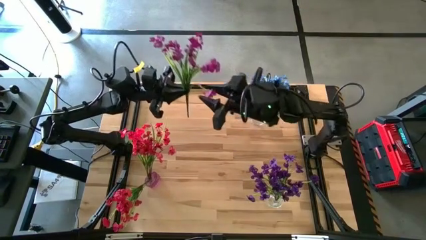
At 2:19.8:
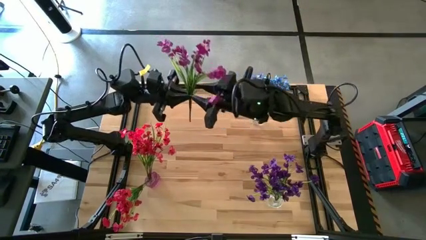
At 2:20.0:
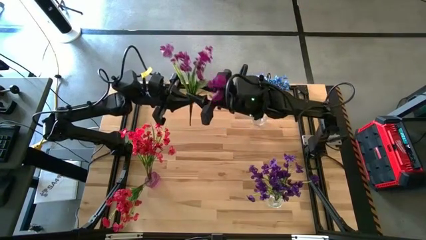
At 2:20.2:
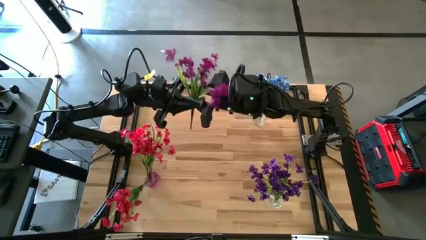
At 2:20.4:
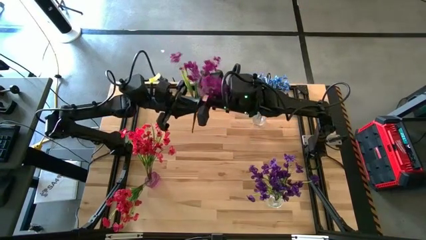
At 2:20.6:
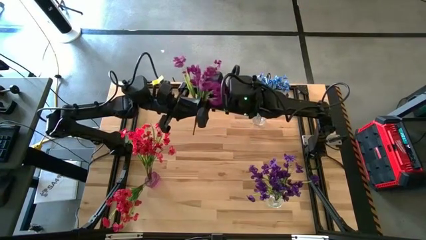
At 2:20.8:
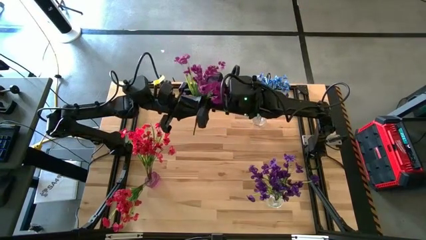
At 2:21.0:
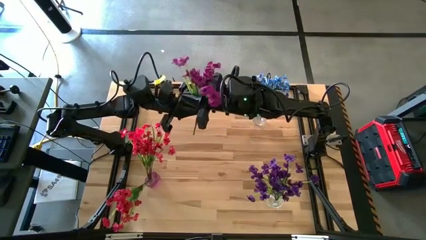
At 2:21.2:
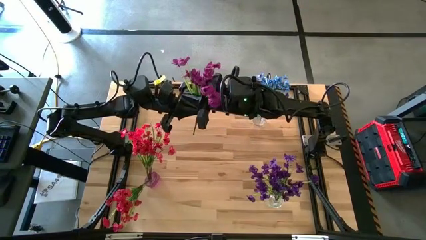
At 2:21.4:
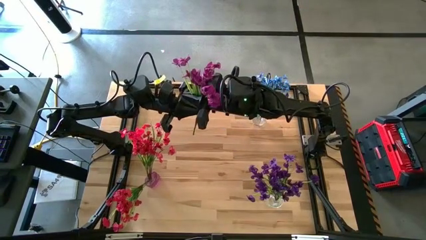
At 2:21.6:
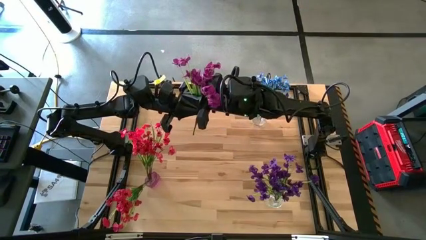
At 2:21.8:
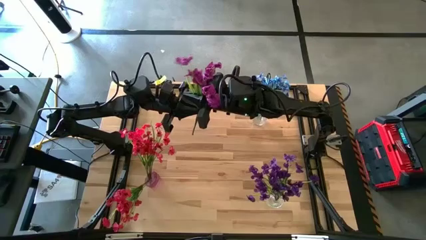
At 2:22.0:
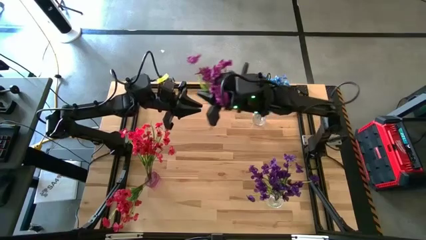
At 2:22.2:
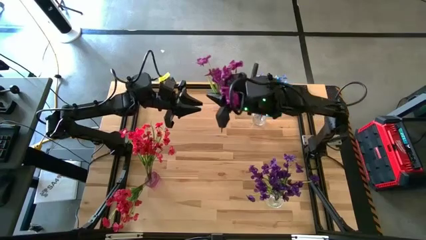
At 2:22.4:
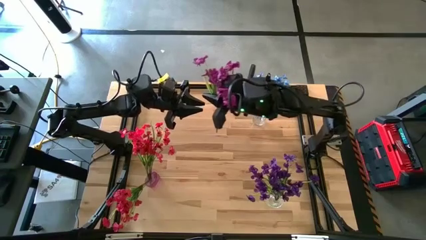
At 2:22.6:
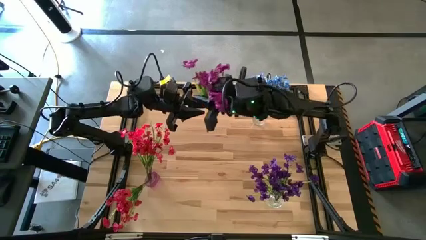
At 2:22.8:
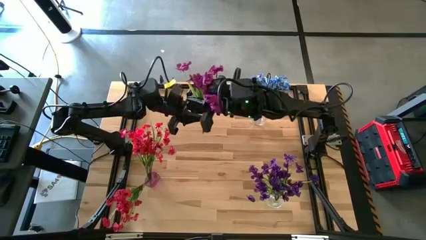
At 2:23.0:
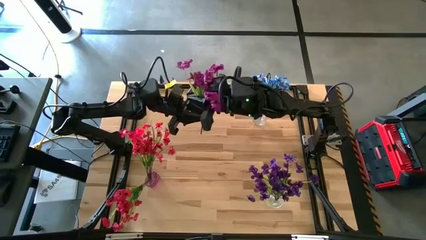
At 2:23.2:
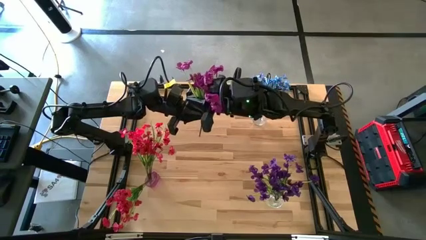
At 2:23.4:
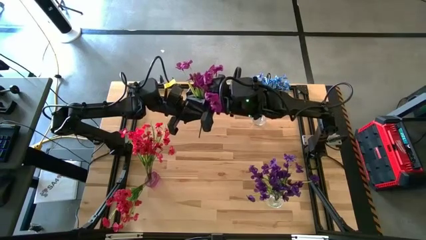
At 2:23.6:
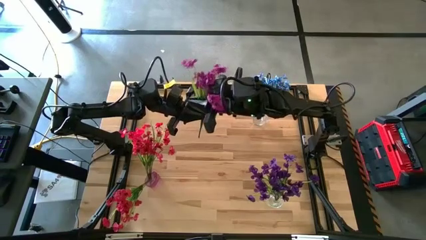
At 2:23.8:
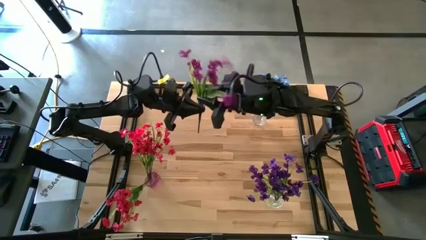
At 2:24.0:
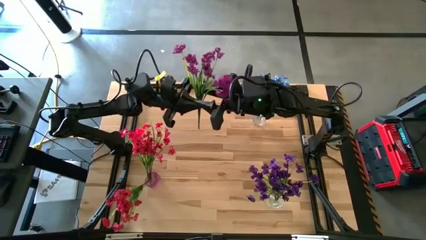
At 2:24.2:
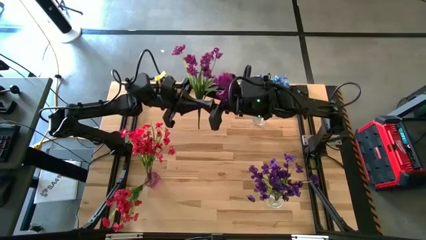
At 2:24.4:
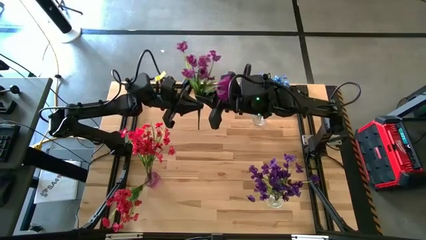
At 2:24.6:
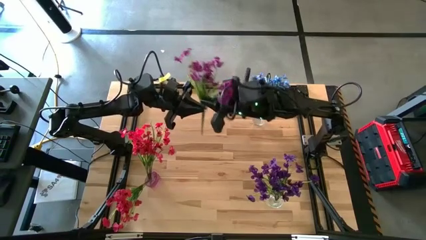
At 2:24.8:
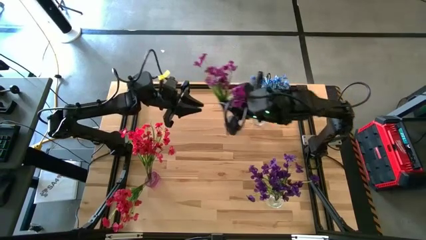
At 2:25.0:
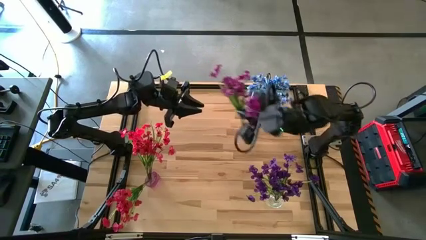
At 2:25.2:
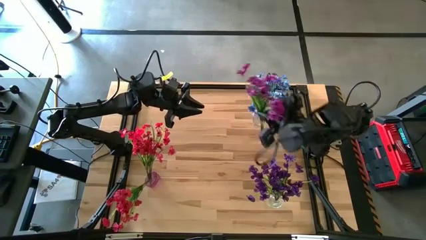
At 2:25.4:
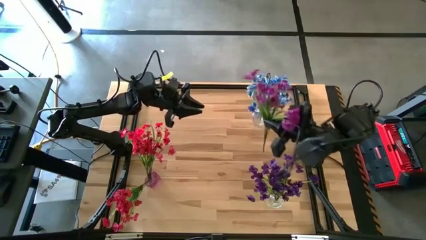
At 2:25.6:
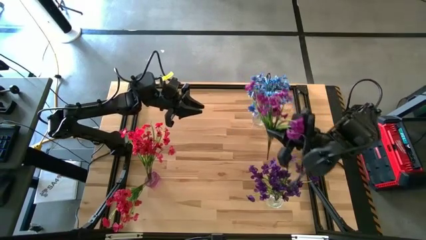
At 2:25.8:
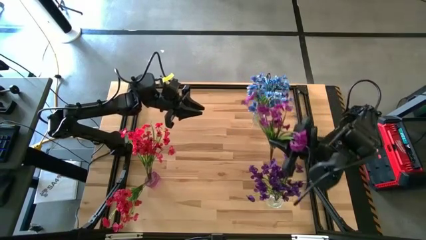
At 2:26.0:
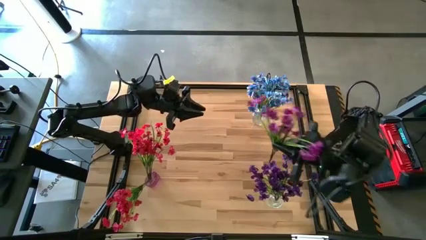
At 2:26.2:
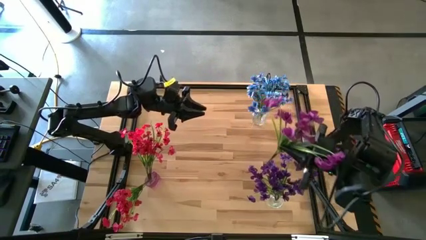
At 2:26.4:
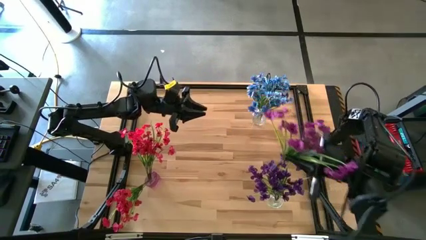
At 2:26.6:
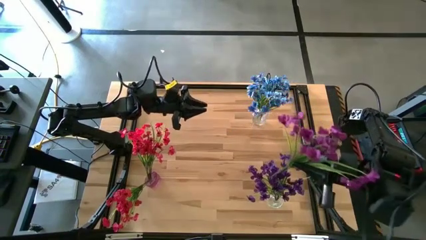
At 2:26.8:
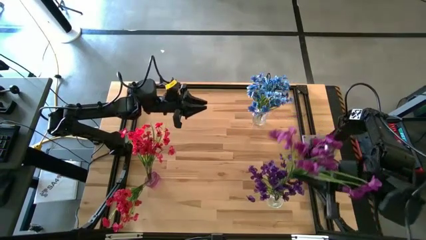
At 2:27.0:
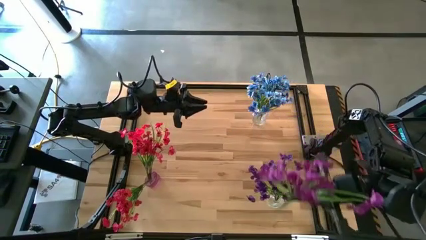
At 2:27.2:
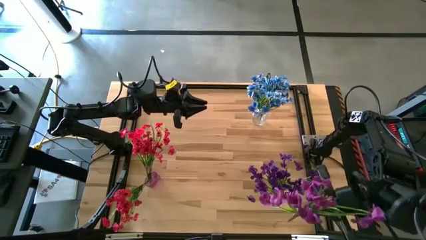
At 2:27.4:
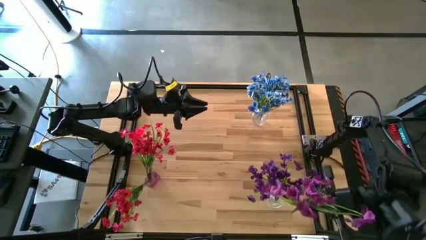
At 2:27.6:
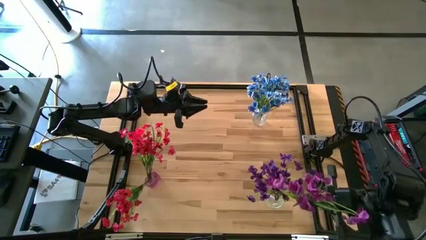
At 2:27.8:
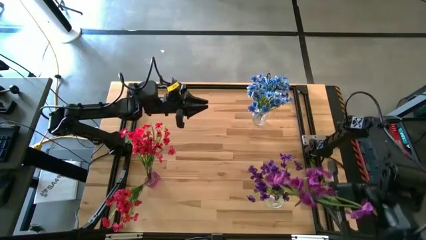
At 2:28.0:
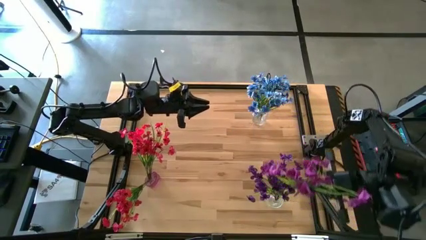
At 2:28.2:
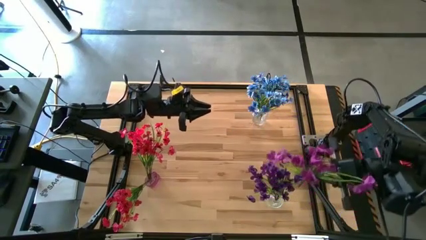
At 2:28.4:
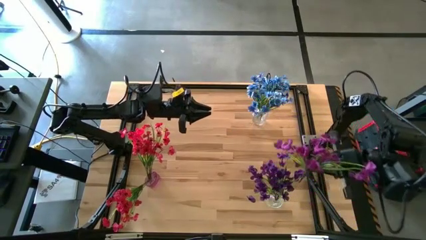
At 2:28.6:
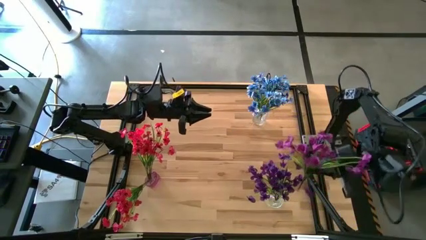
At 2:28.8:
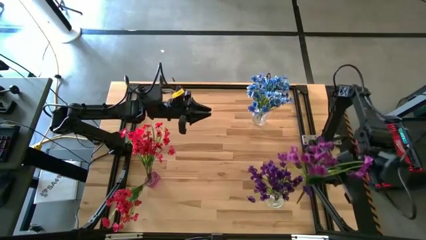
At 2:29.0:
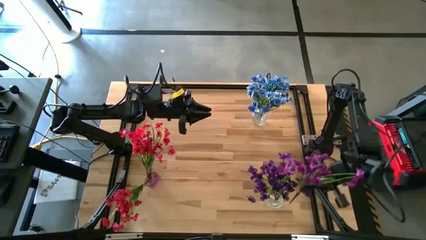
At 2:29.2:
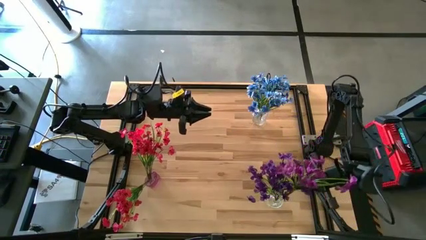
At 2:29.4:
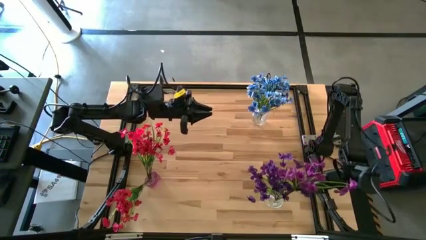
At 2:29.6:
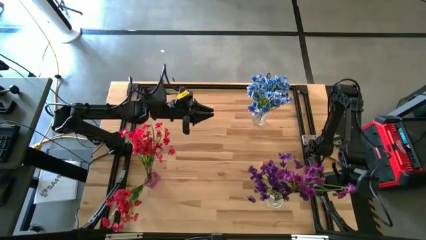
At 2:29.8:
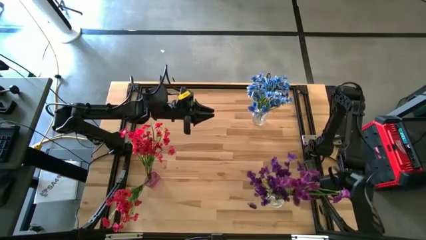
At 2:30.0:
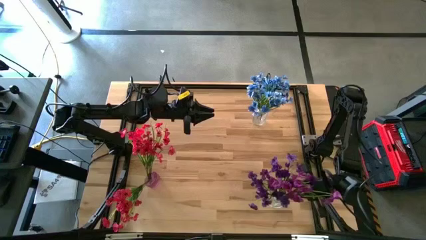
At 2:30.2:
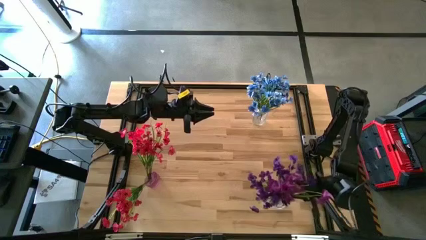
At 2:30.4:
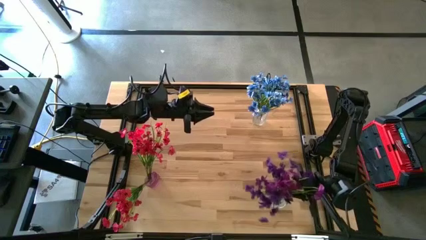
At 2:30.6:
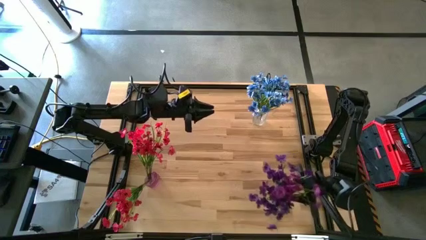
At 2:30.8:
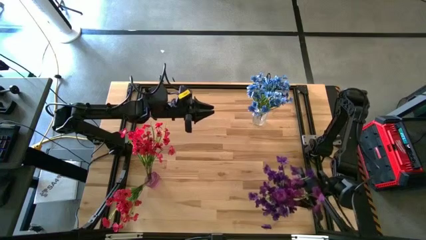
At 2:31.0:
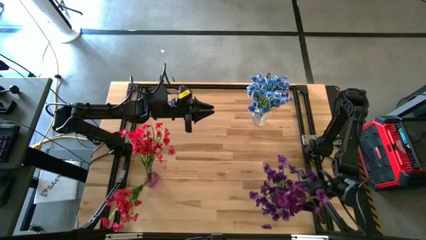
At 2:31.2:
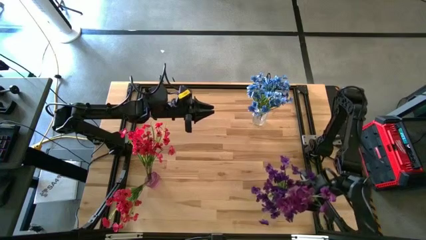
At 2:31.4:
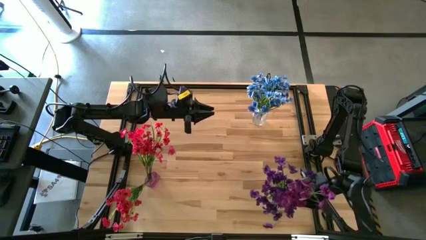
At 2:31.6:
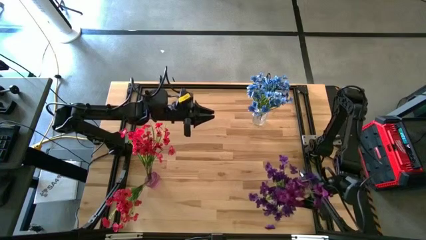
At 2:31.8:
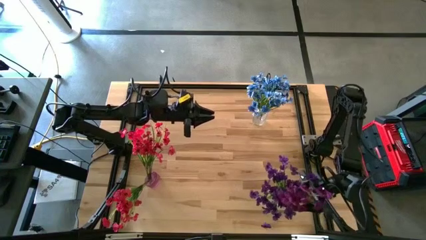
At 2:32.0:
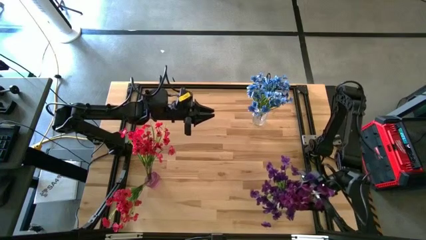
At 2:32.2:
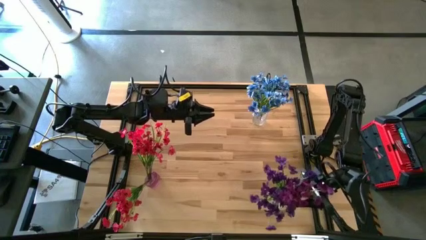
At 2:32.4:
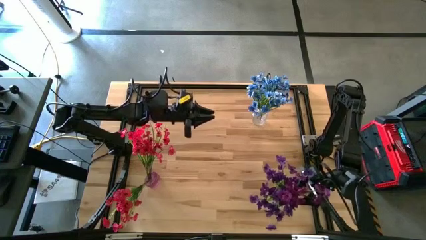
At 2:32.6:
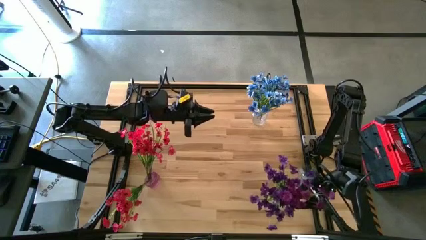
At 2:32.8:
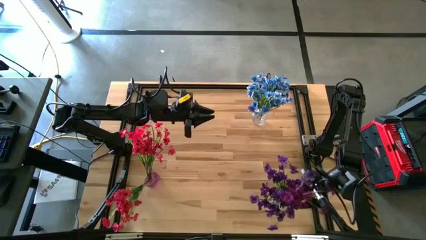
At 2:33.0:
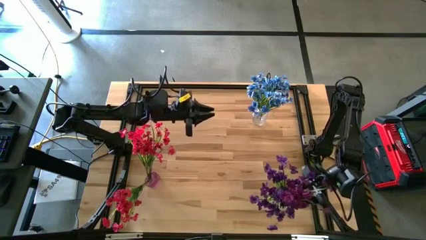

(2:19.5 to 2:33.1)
Task: Sort flowers into vase by color
Put the violet flower into the bottom transparent flower vase
